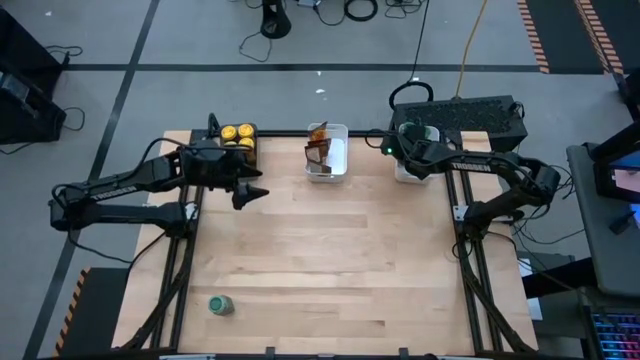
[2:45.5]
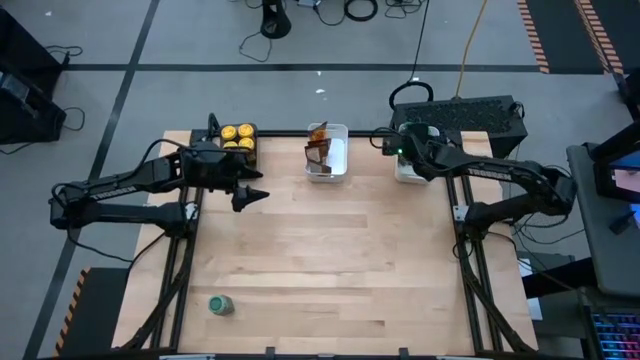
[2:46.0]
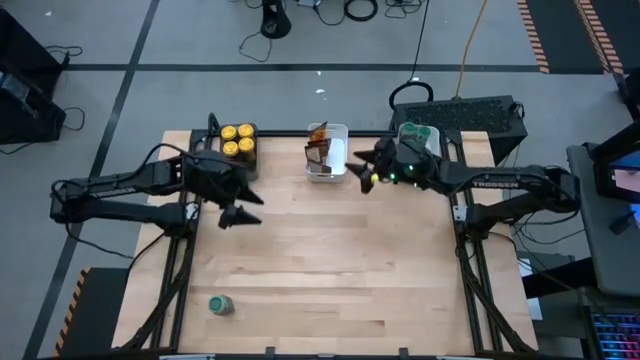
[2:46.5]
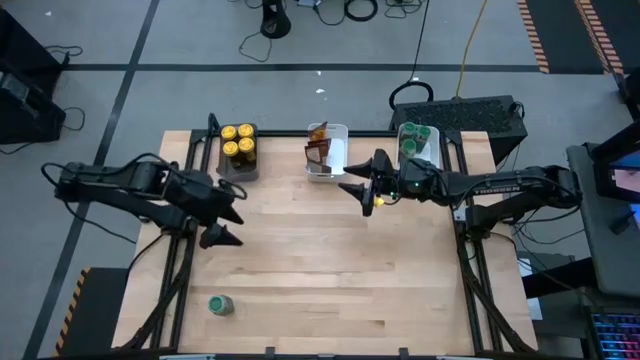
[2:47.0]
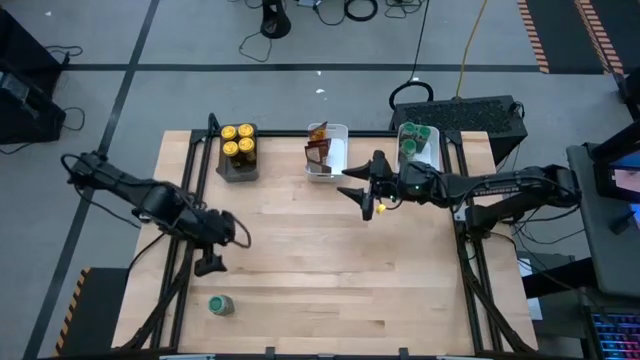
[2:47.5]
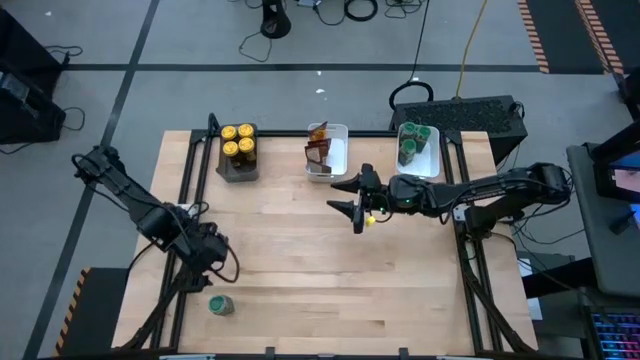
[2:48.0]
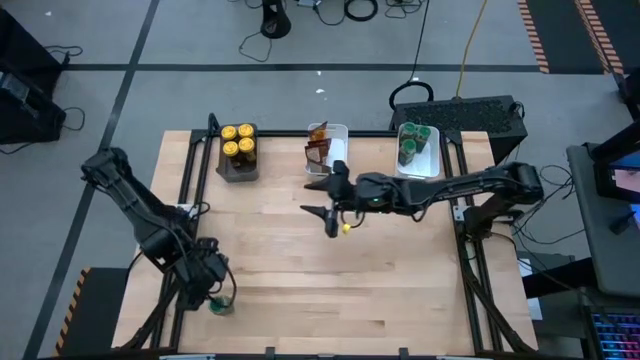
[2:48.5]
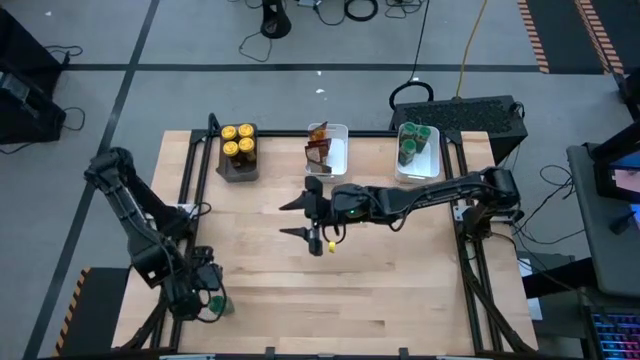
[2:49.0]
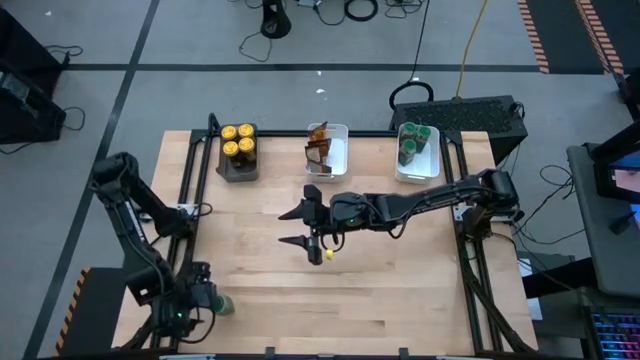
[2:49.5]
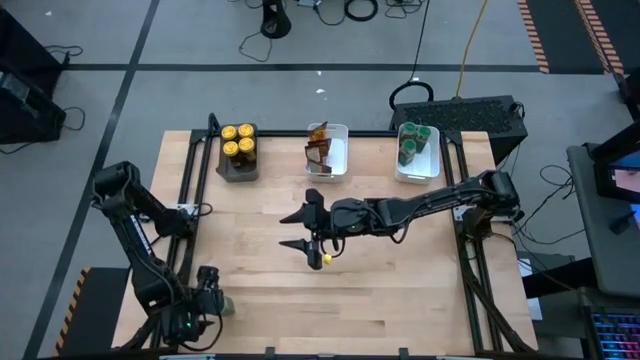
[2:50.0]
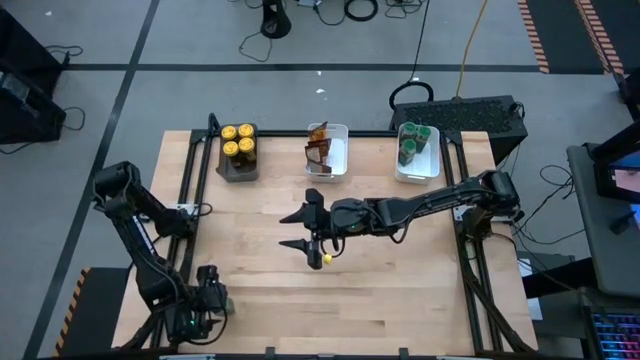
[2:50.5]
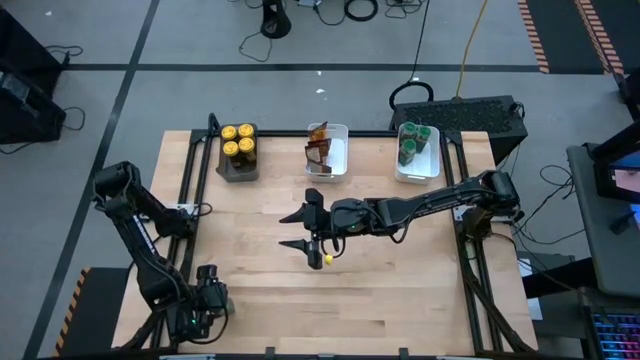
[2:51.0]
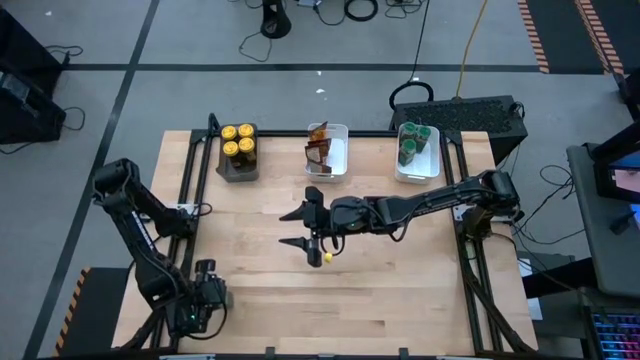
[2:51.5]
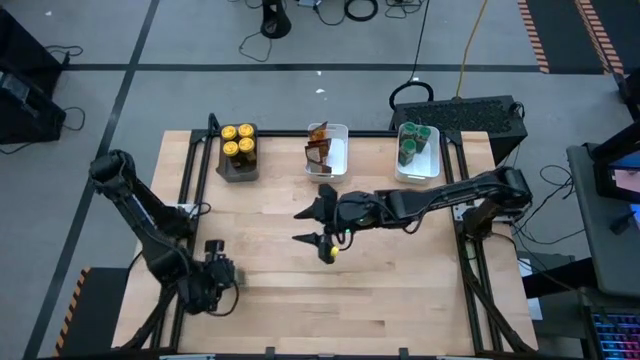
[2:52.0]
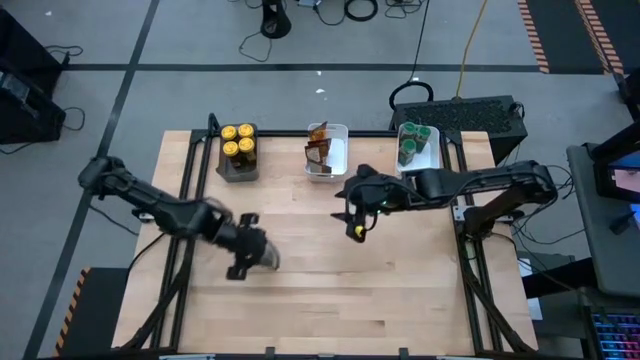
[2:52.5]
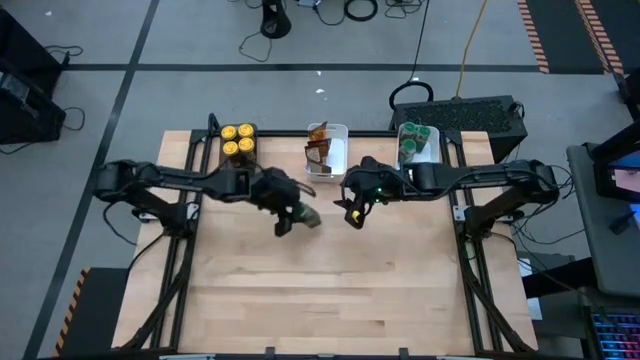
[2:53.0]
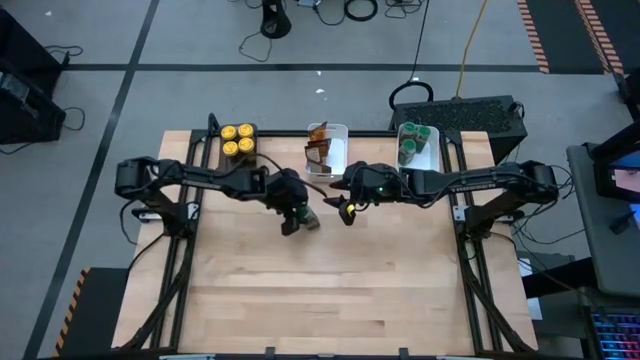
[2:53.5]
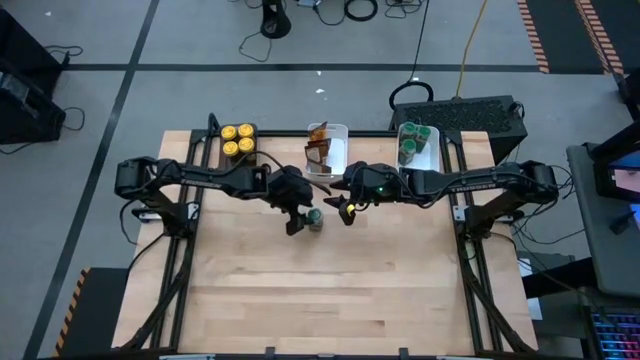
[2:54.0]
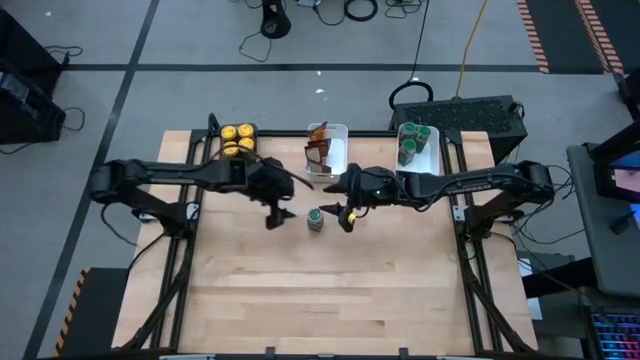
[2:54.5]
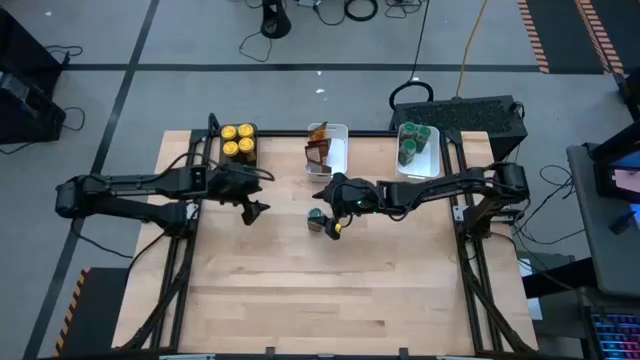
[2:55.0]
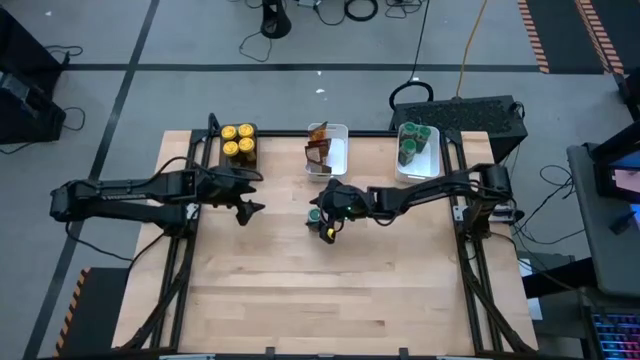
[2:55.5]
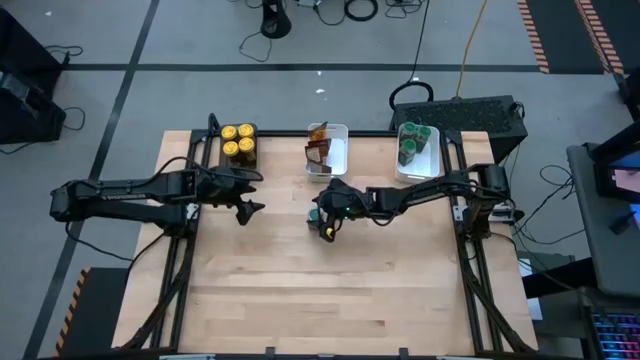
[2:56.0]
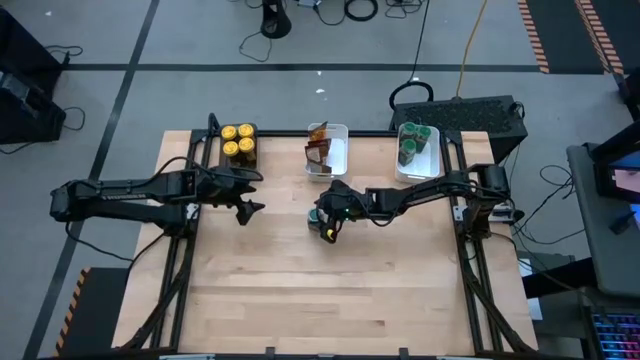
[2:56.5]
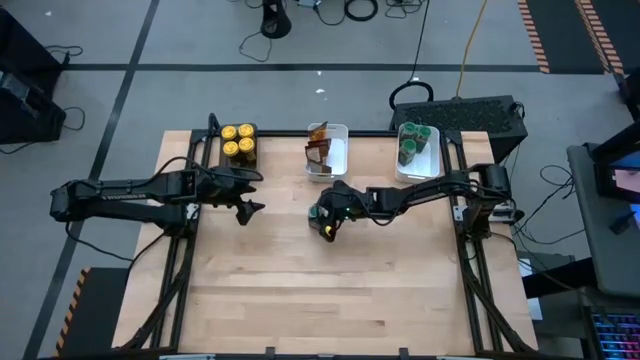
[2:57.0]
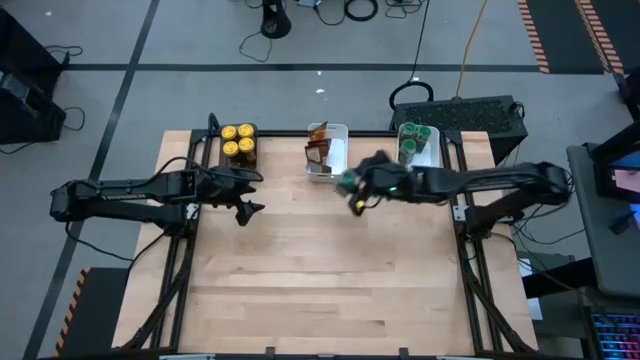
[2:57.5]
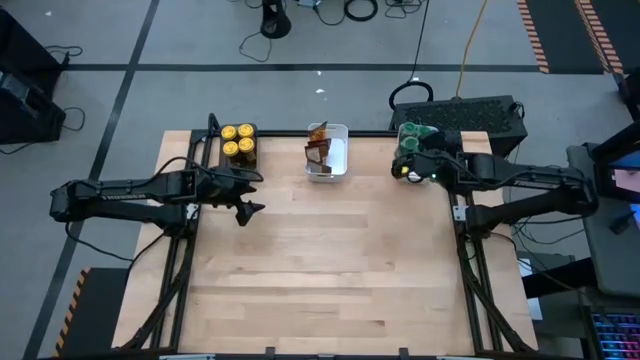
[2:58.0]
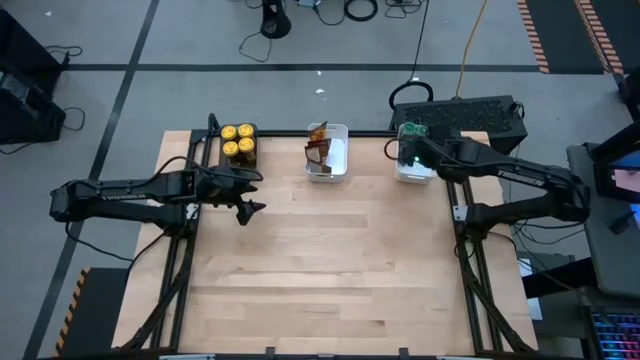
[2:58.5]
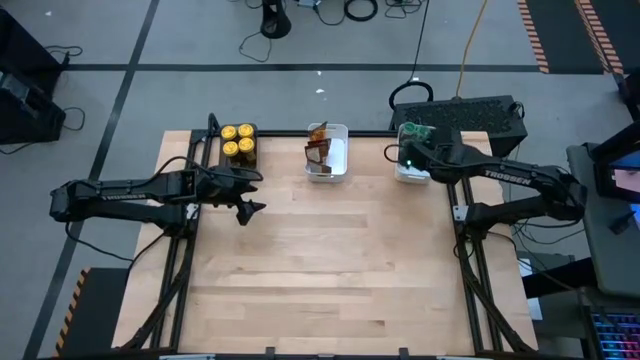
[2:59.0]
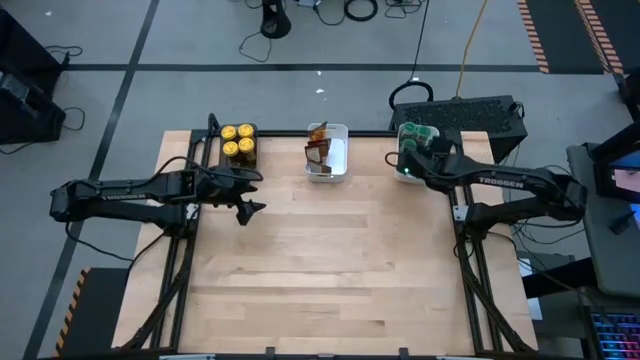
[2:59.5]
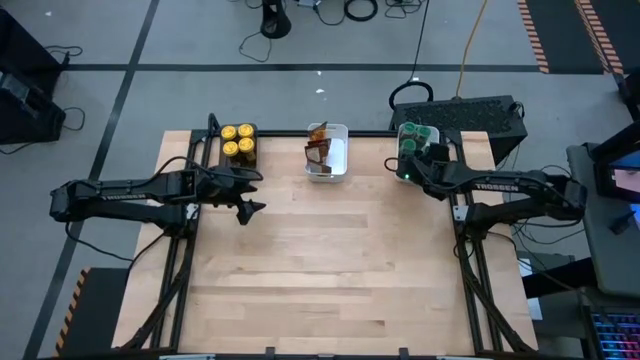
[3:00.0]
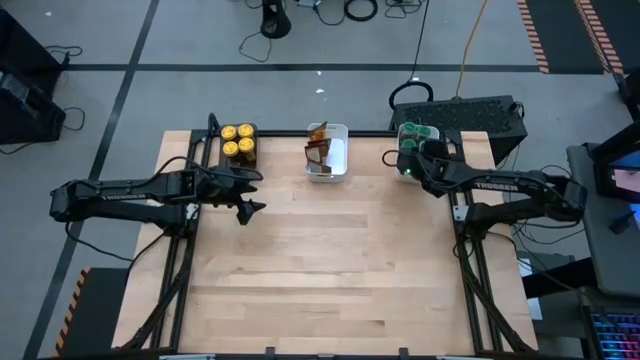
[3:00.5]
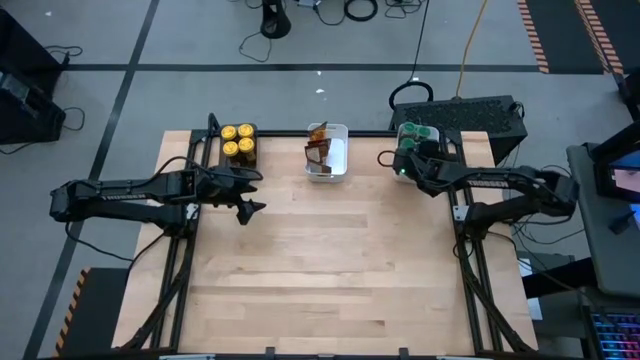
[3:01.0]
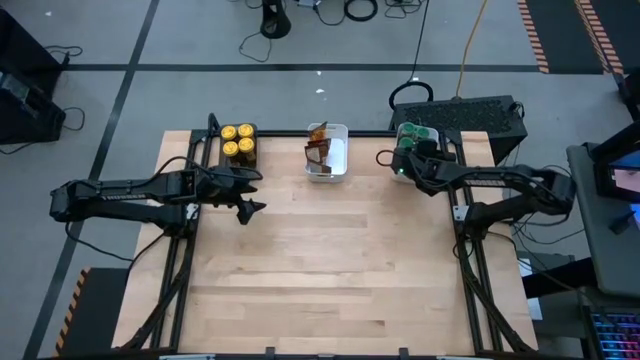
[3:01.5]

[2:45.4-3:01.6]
Task: Sort spices by type
Put the green seasoning bottle into the right white bin

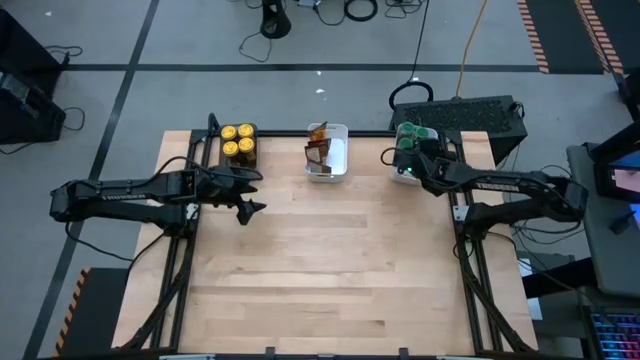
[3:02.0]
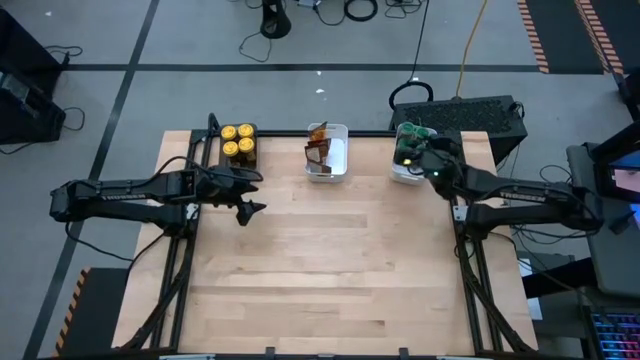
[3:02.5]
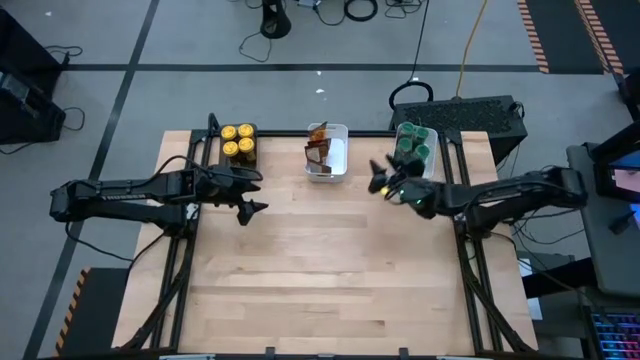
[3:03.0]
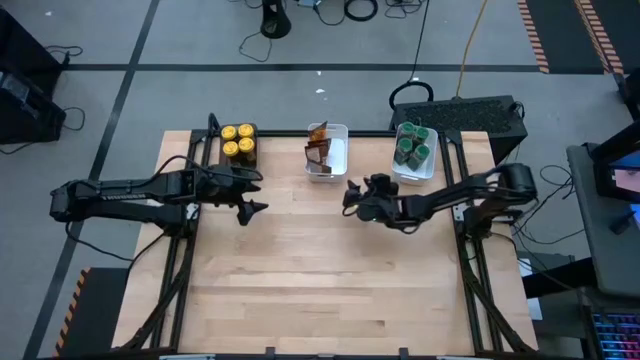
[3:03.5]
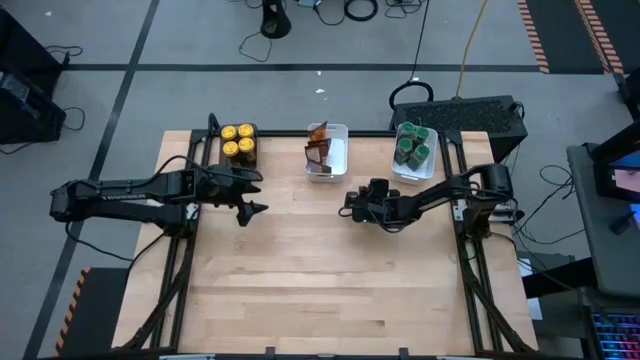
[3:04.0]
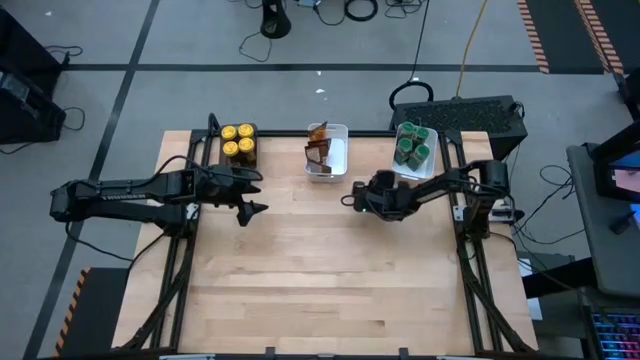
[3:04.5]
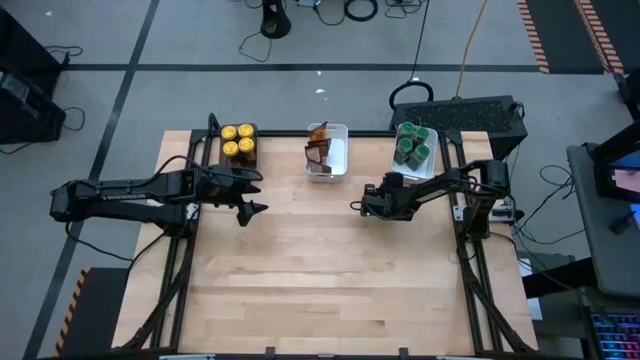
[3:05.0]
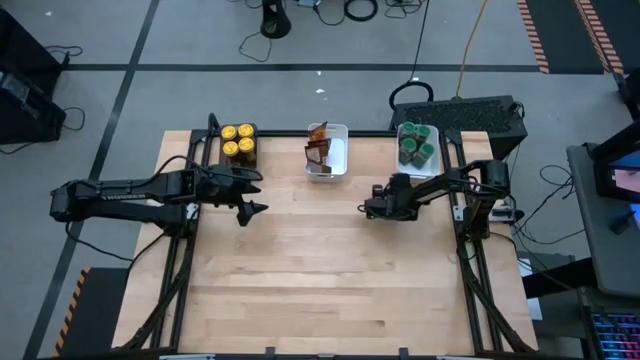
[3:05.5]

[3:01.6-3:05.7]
Adjust the right white bin to align with the other bins

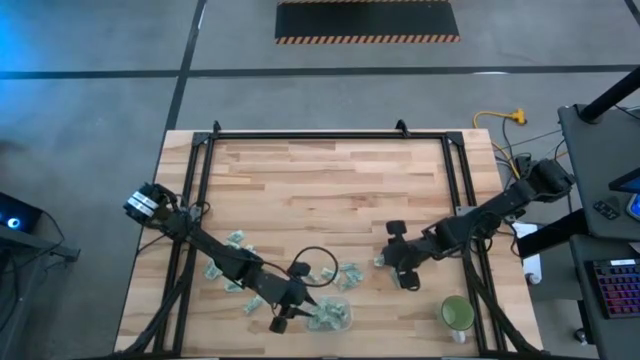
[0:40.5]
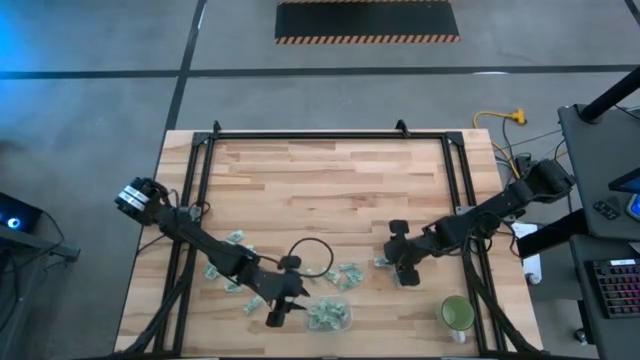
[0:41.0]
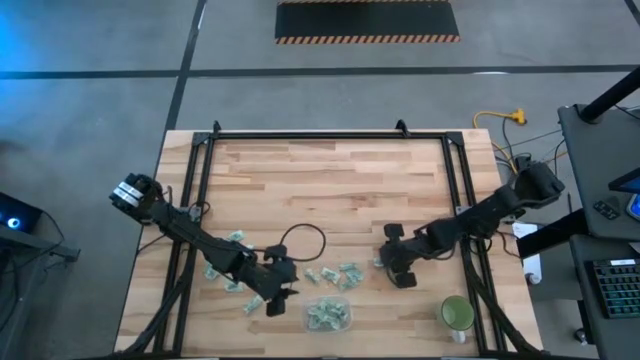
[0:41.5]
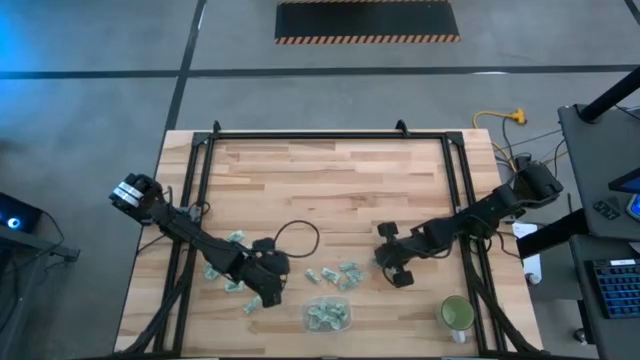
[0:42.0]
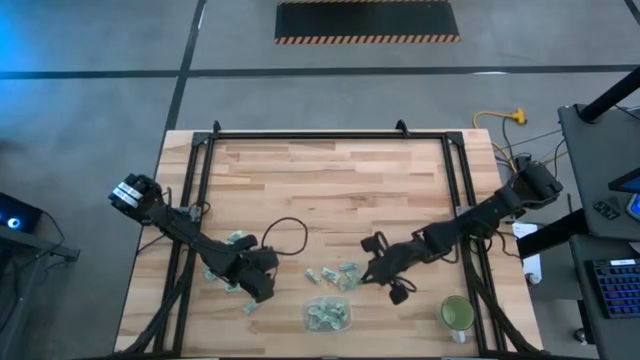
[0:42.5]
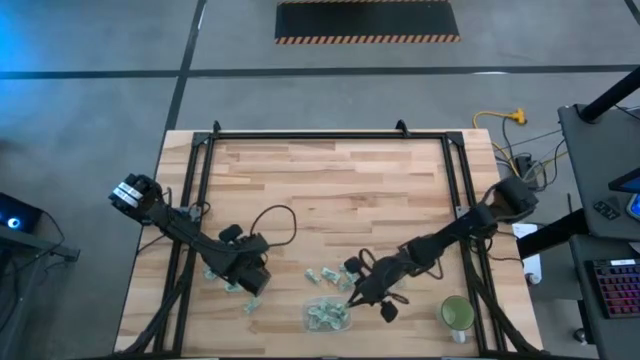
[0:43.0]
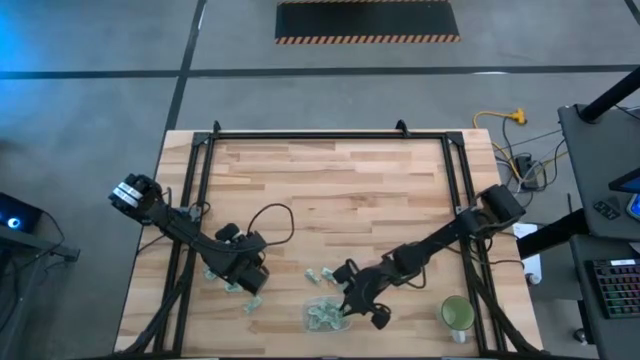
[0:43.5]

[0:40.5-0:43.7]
Task: Pick and place Stevia / Truvia into bins
Put the stevia packet into the transparent container
